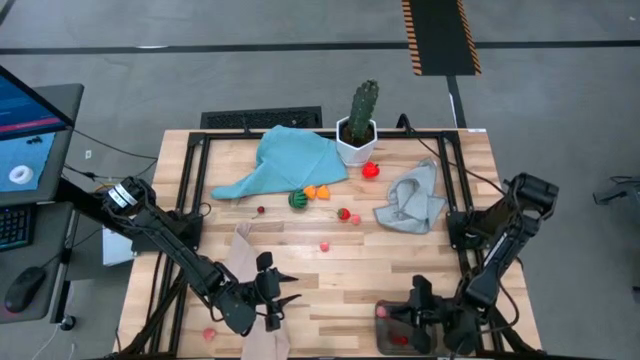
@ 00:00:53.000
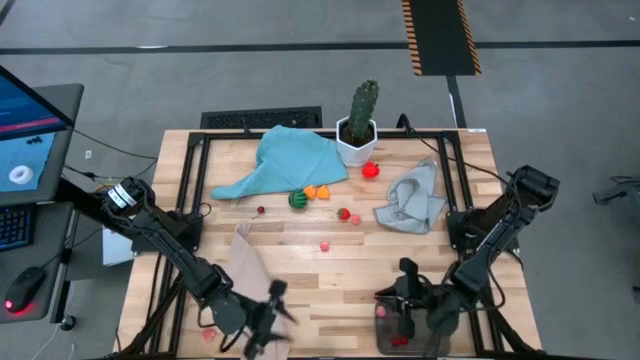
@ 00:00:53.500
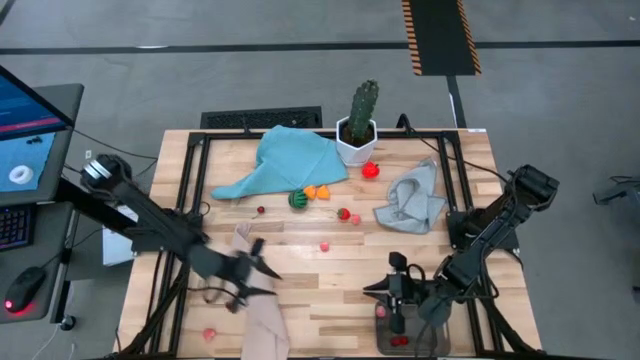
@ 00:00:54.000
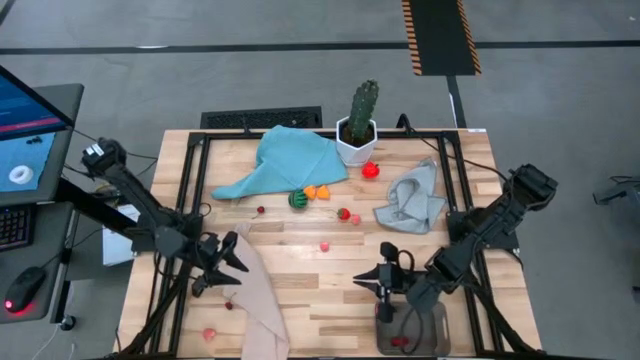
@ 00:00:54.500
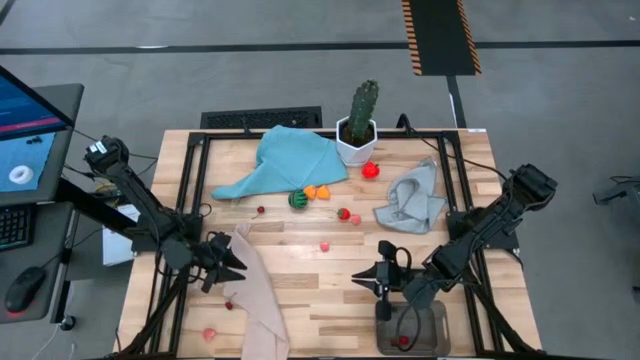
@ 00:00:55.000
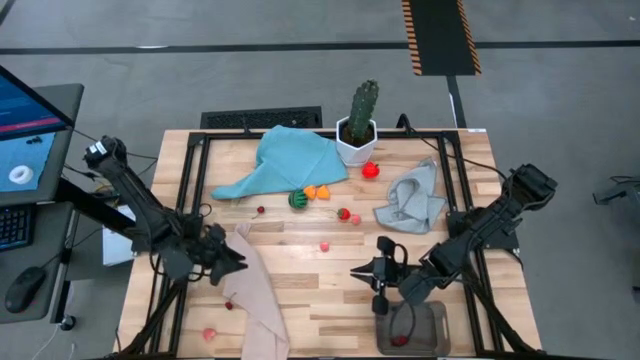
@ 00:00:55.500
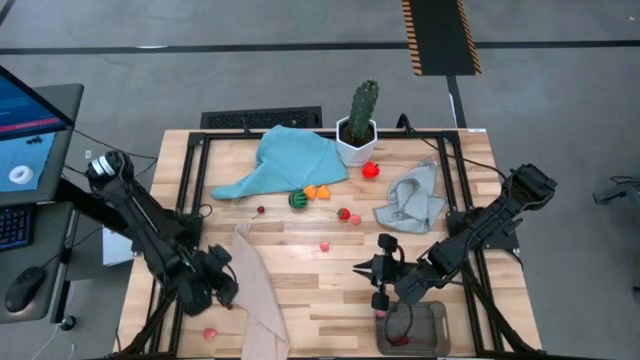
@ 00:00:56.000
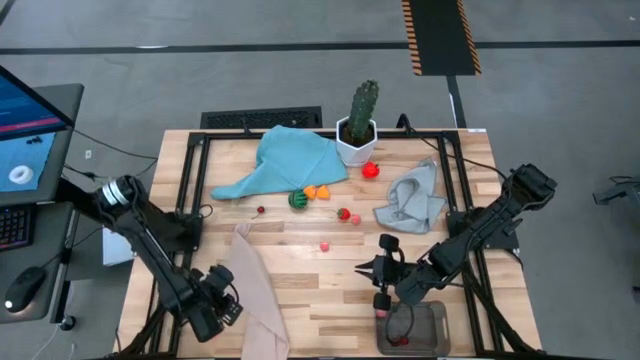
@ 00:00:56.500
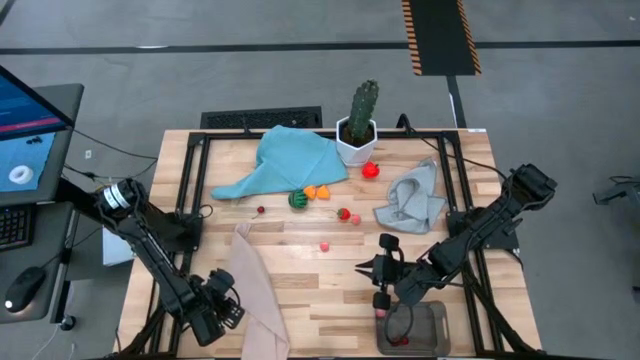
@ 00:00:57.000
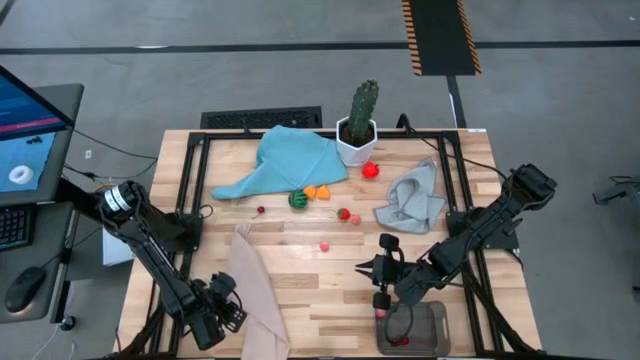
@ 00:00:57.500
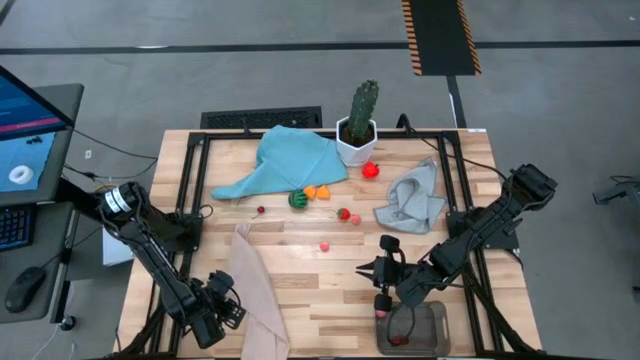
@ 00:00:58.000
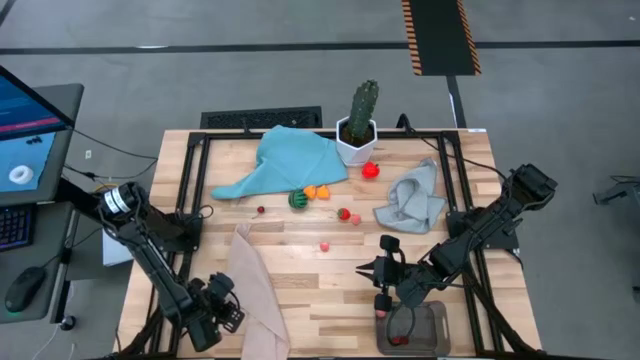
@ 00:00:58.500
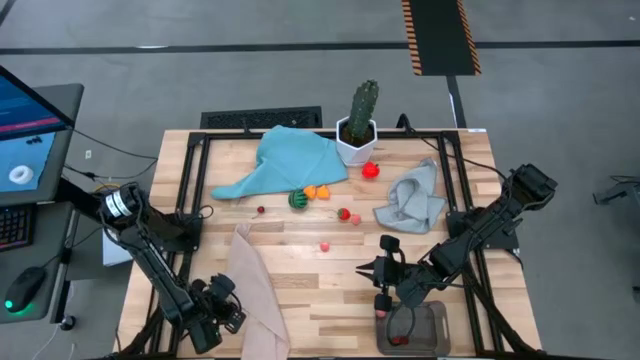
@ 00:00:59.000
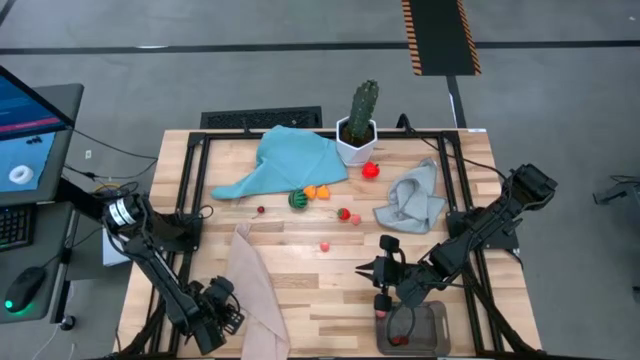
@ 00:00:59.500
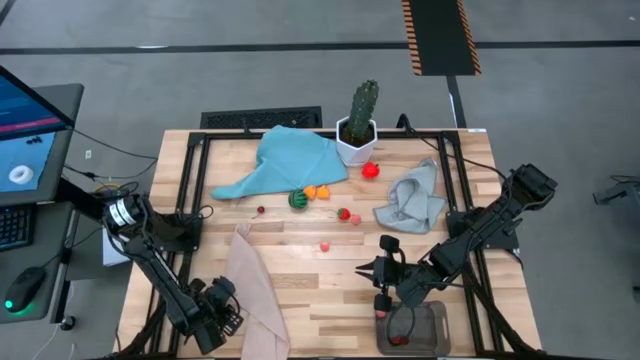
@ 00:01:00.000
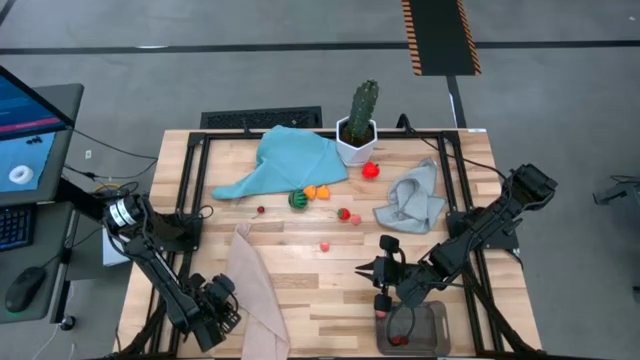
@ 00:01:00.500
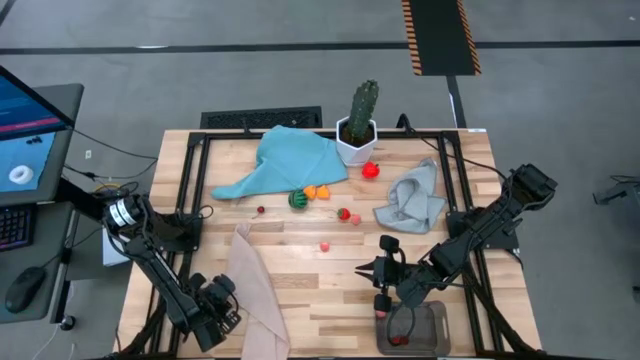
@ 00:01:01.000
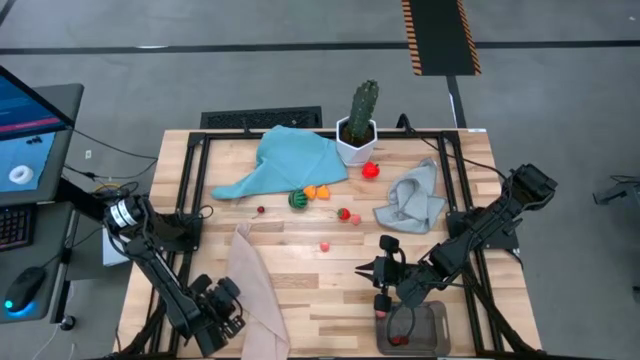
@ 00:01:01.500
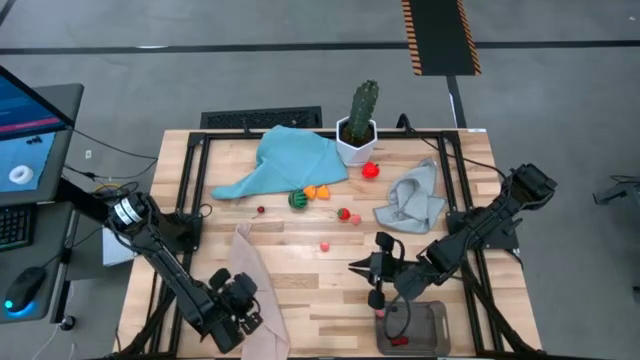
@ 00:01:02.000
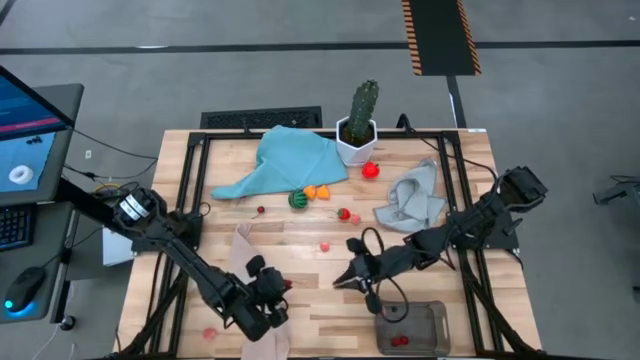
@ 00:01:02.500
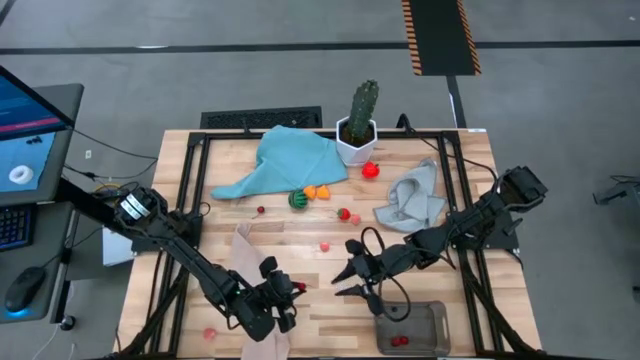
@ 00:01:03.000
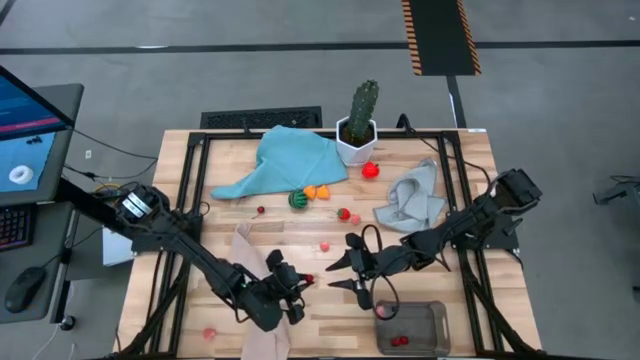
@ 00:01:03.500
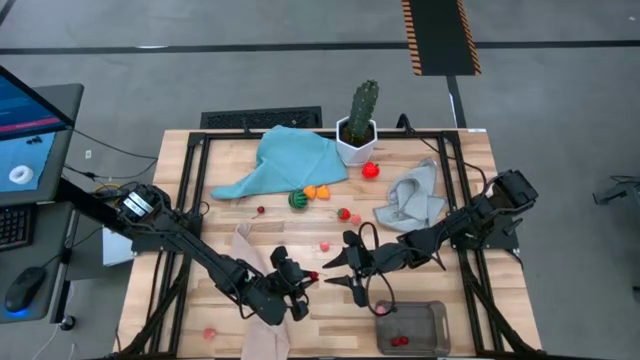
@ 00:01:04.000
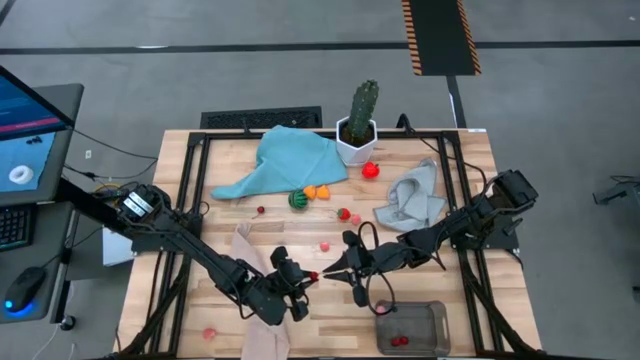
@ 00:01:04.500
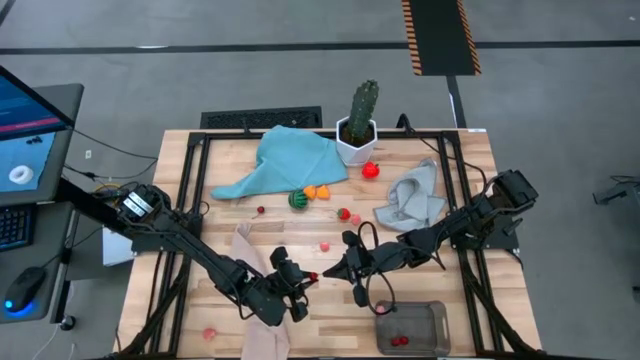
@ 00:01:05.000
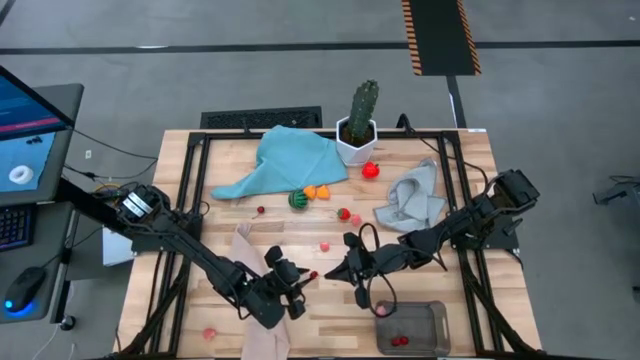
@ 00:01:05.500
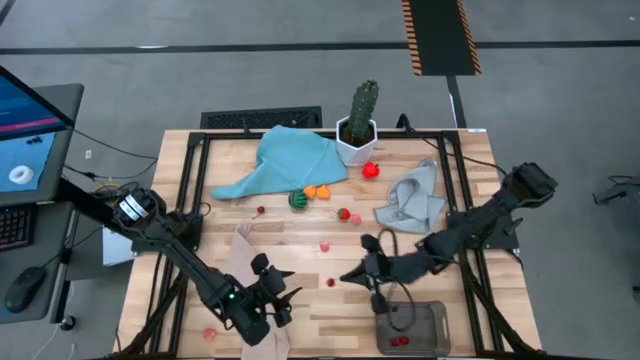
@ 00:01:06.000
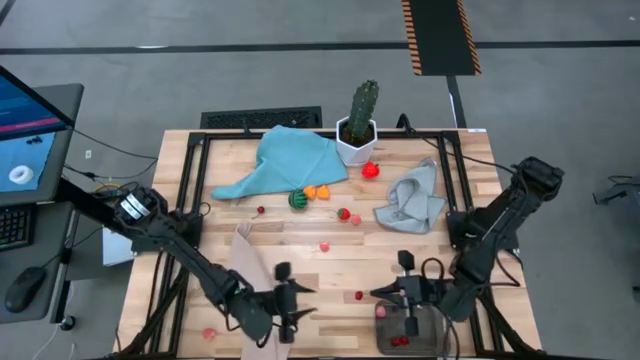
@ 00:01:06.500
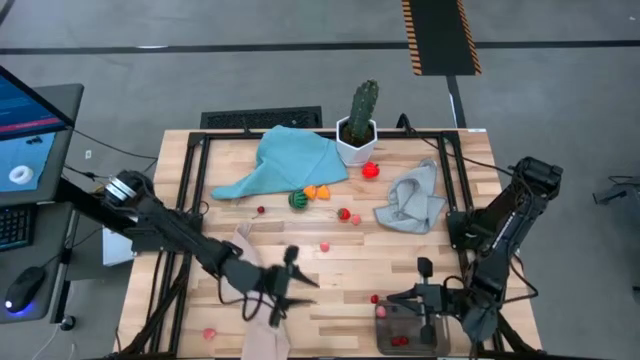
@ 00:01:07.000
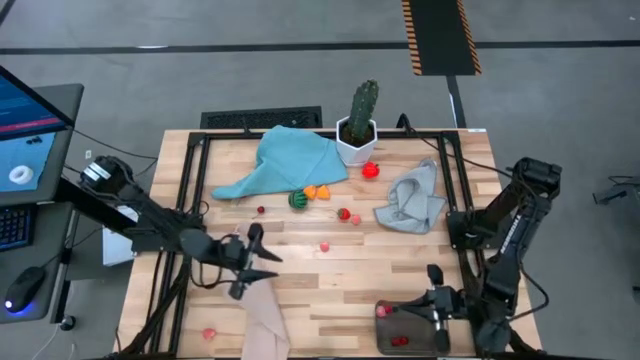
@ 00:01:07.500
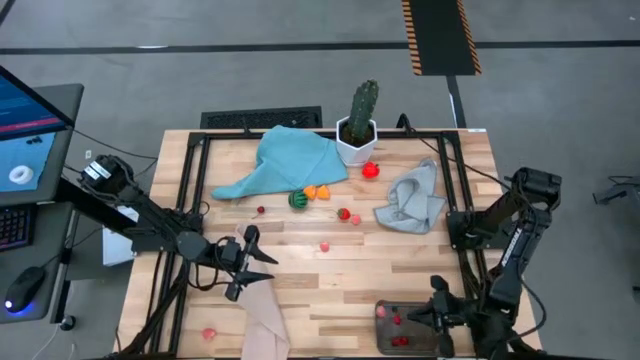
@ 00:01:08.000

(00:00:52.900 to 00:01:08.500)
Task: Pick and placing Produce into tupperware
Put the cherry into the black bin

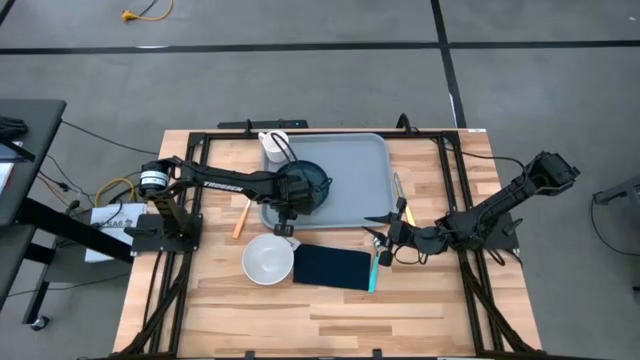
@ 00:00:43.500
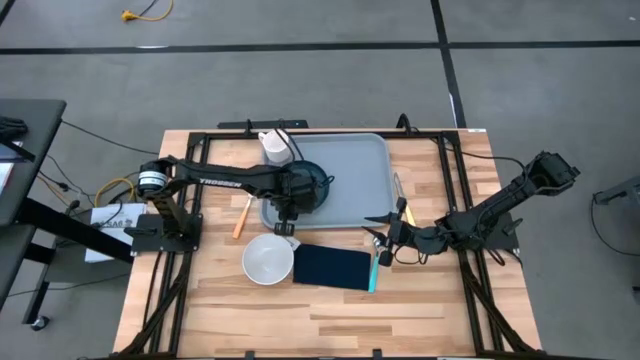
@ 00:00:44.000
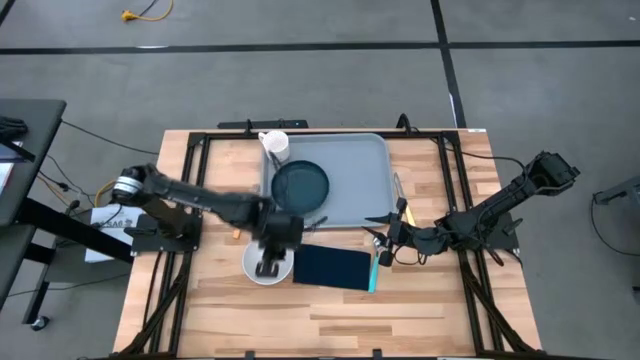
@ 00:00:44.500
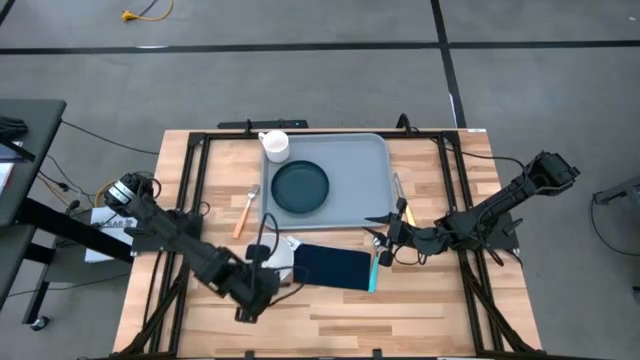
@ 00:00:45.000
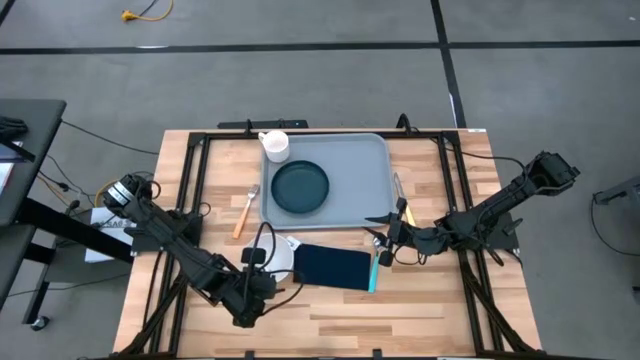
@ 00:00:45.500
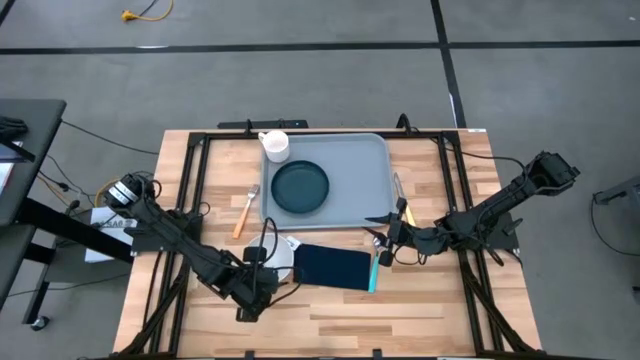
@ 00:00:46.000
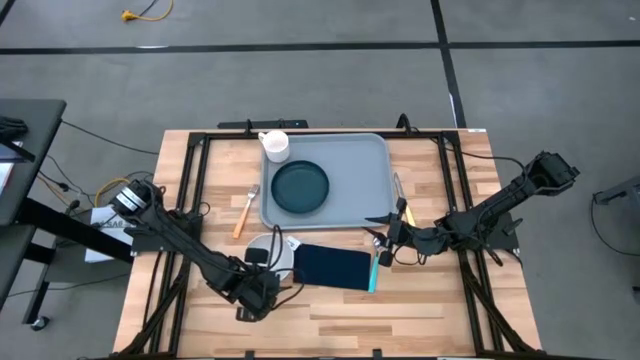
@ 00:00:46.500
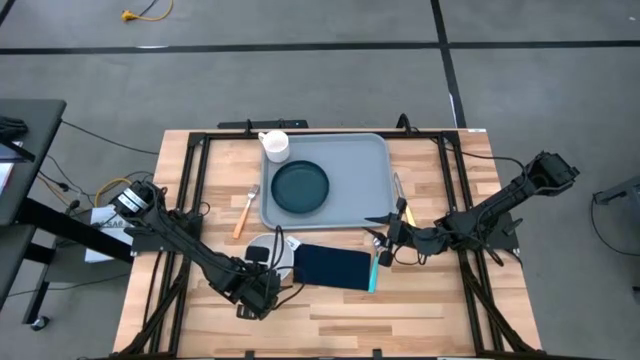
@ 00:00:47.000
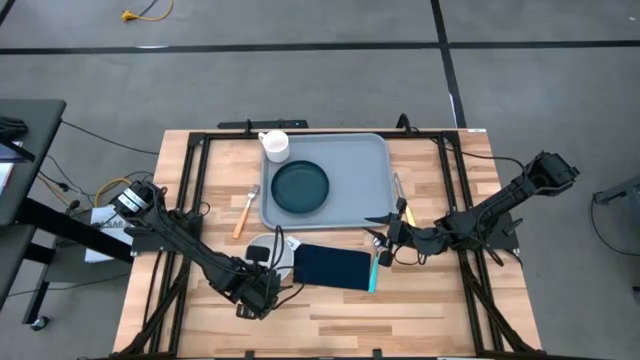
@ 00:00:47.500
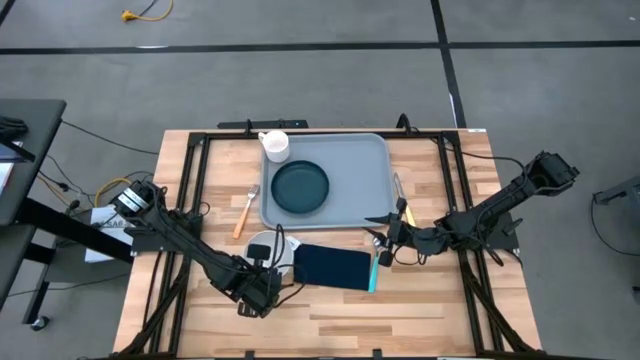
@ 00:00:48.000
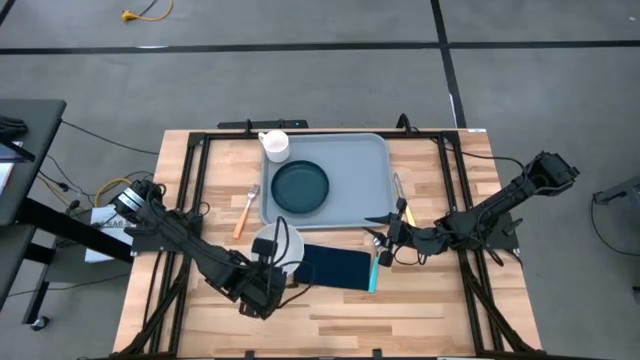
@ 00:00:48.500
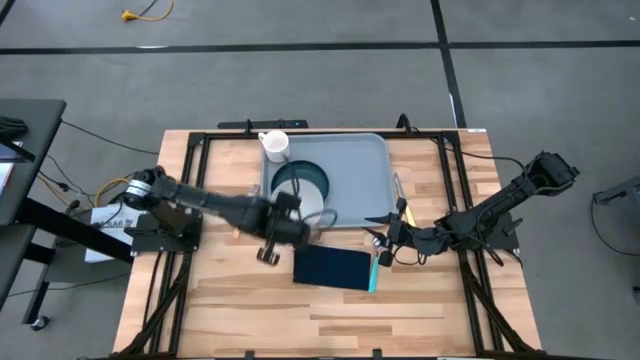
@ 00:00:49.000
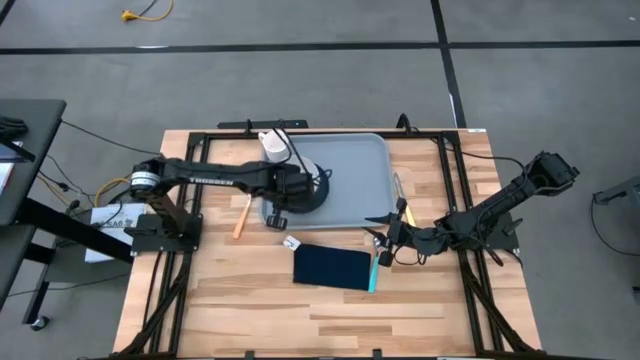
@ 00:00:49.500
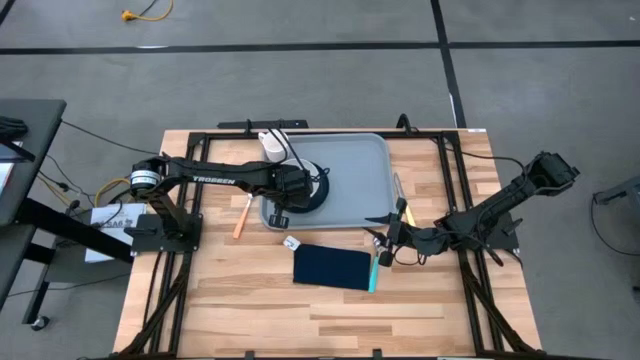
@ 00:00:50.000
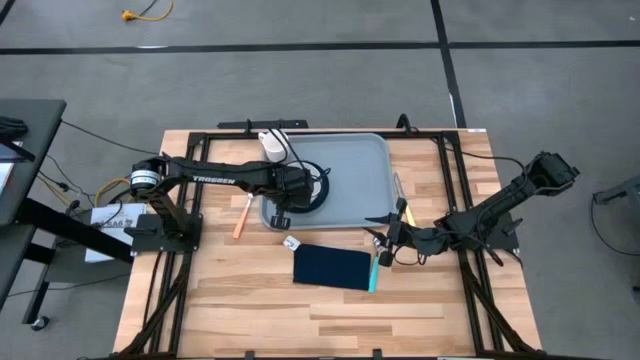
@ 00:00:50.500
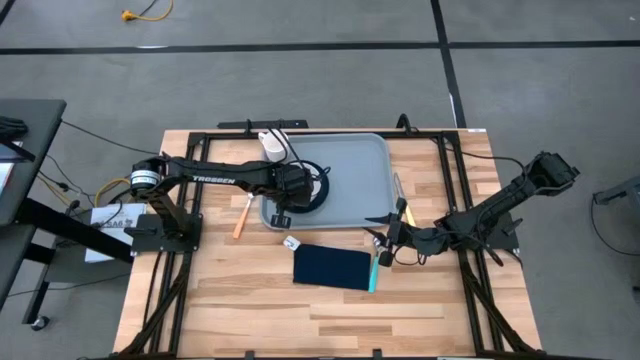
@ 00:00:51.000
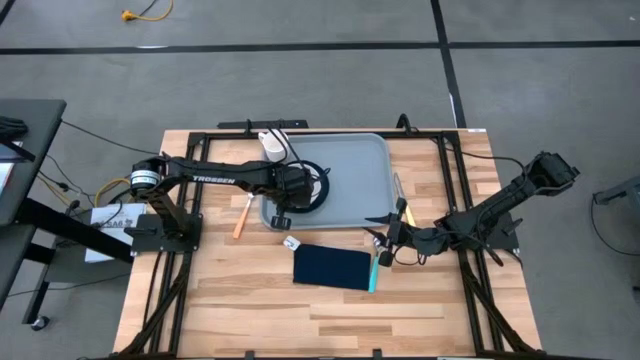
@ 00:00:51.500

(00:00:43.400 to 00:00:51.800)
Task: Set up tray
Put the white bowl on the green plate on the gray tray
